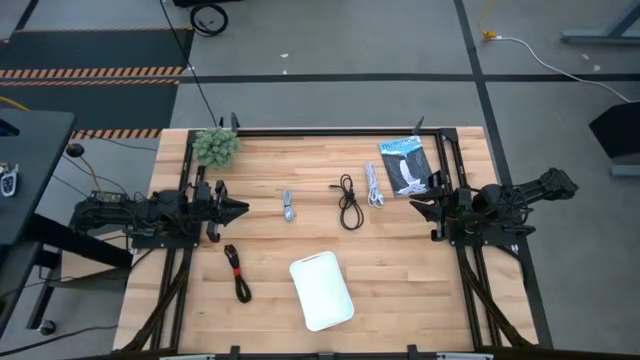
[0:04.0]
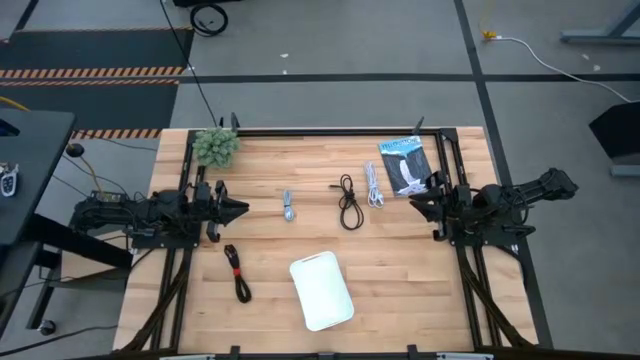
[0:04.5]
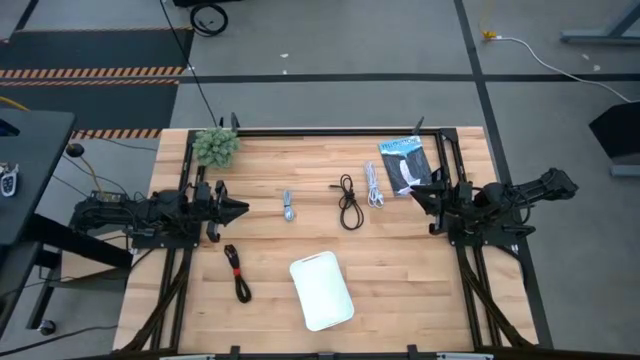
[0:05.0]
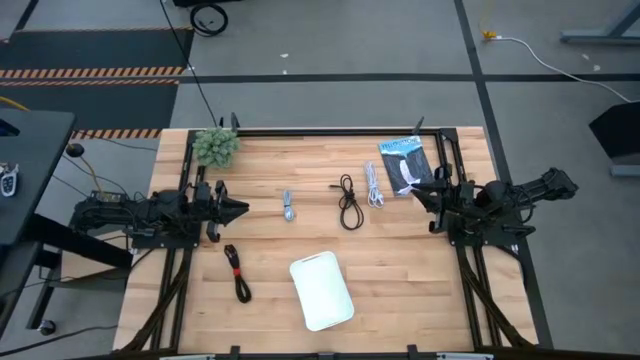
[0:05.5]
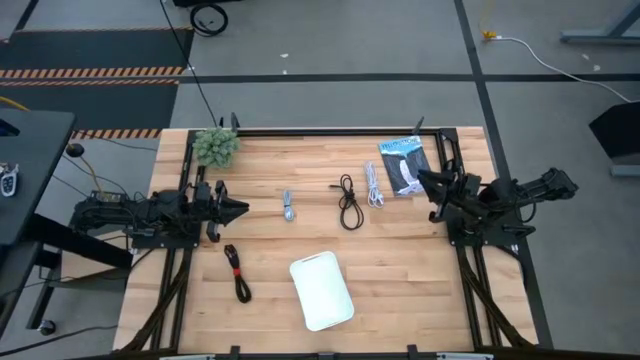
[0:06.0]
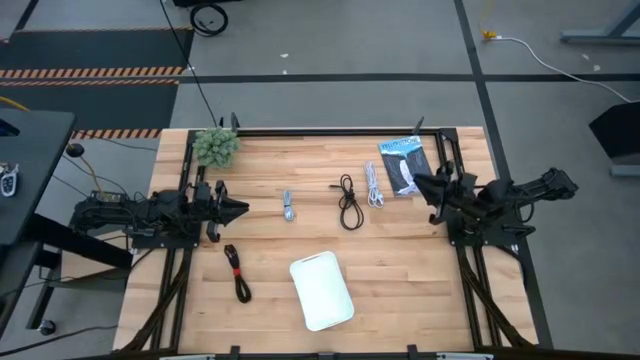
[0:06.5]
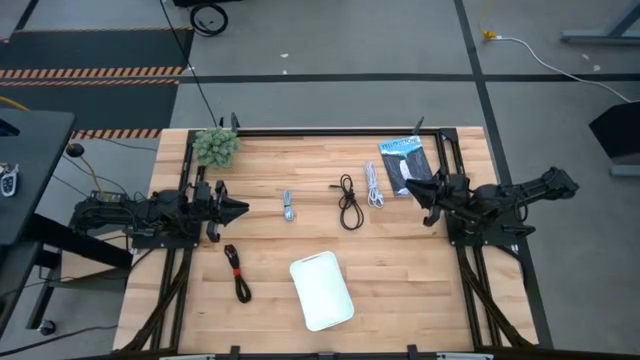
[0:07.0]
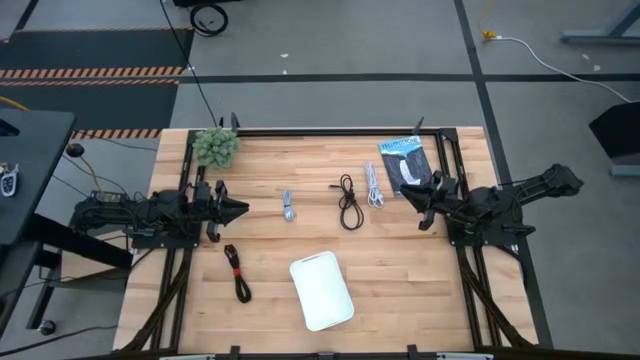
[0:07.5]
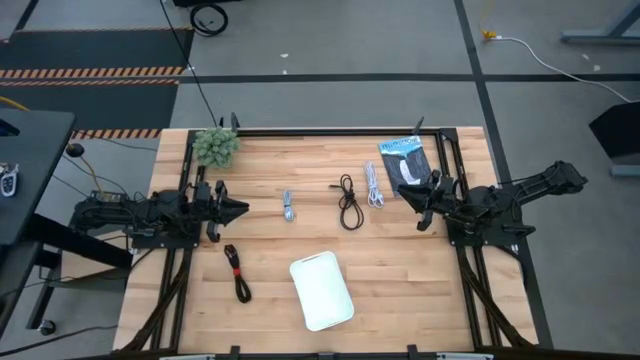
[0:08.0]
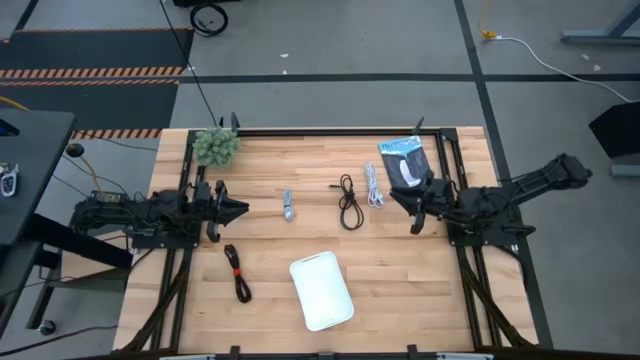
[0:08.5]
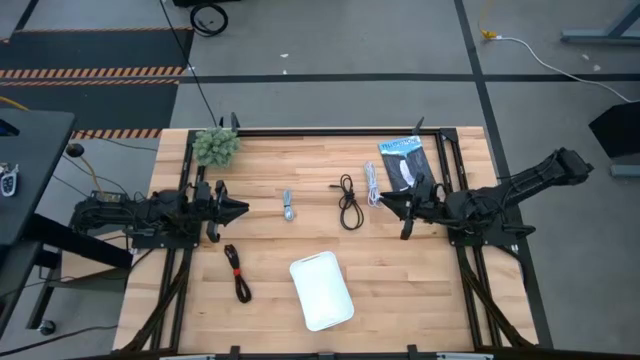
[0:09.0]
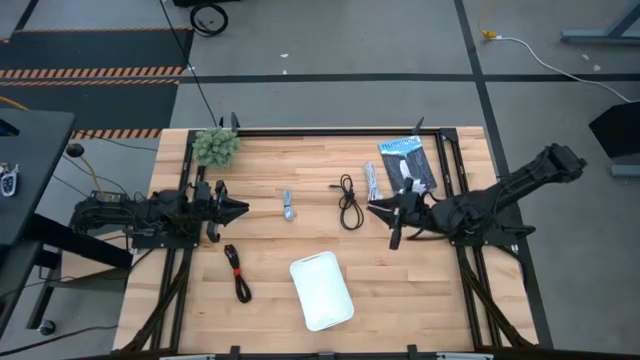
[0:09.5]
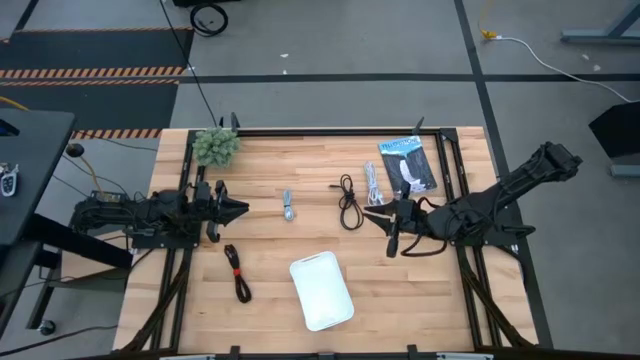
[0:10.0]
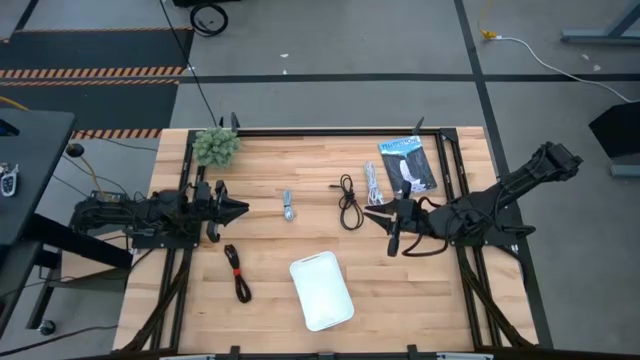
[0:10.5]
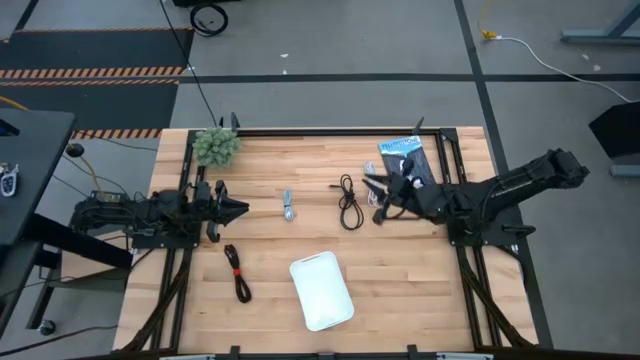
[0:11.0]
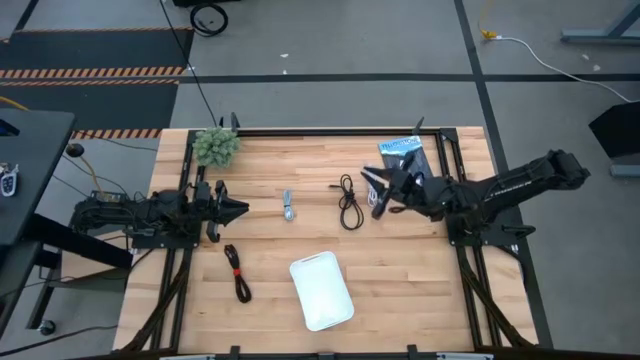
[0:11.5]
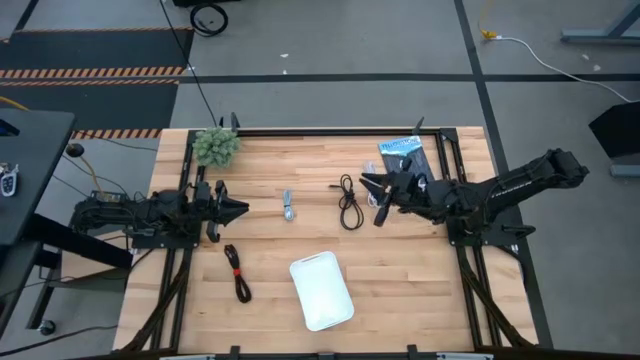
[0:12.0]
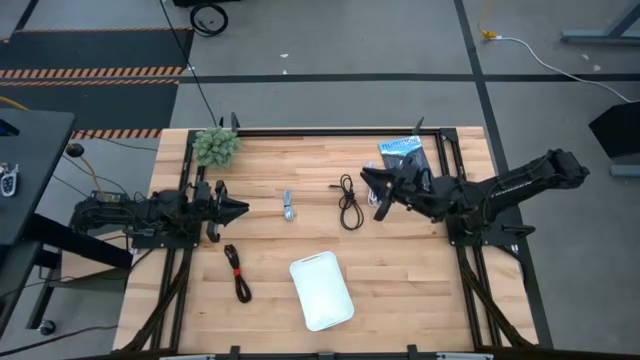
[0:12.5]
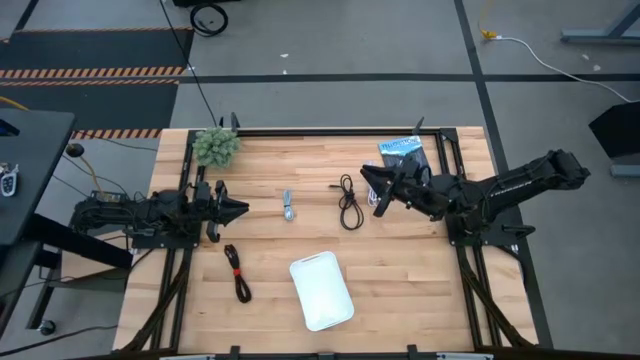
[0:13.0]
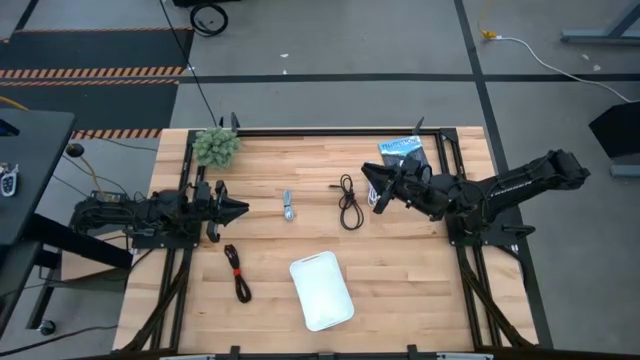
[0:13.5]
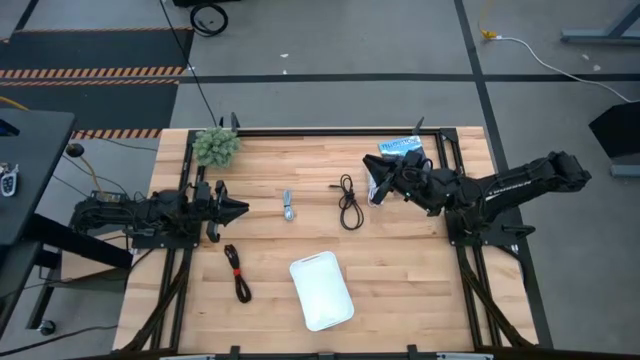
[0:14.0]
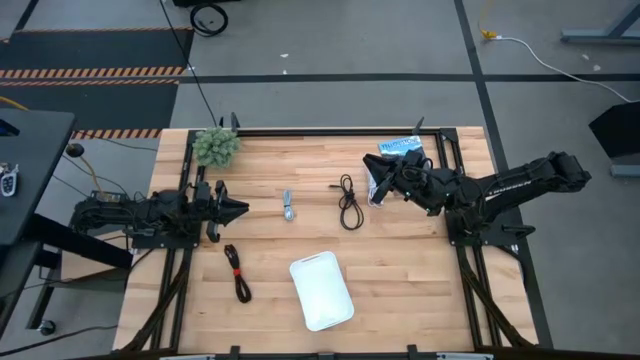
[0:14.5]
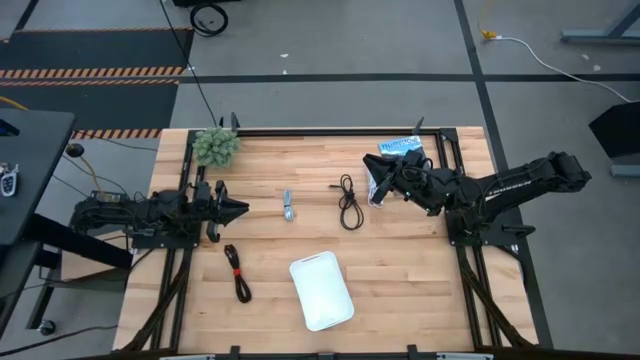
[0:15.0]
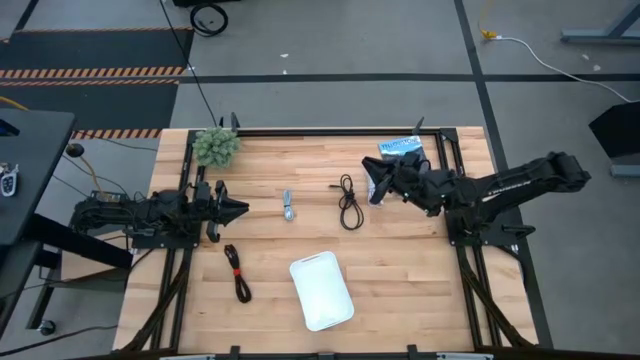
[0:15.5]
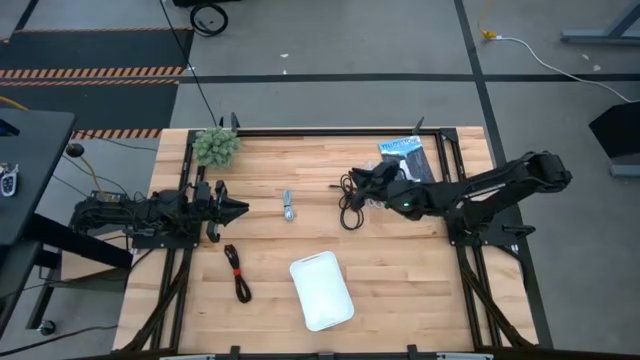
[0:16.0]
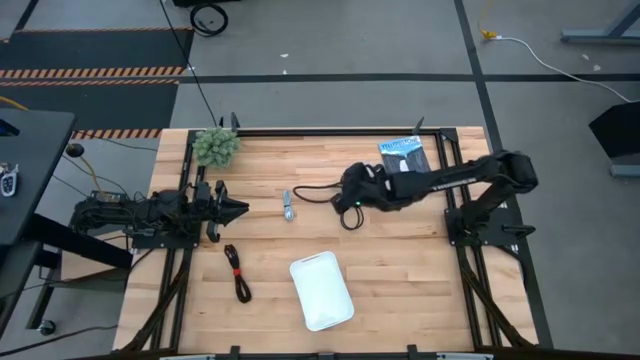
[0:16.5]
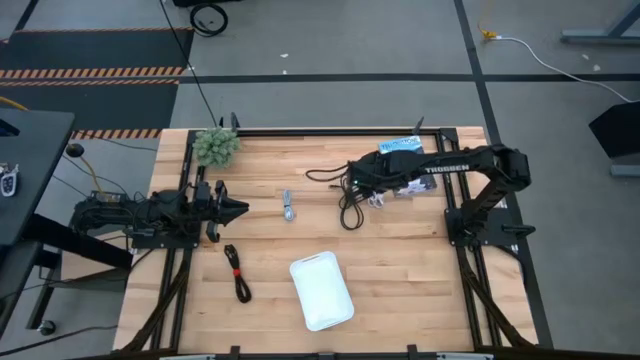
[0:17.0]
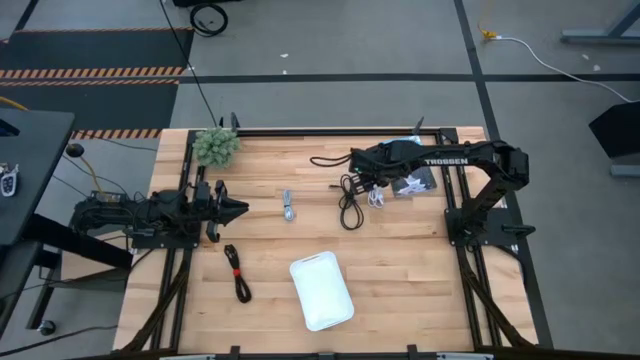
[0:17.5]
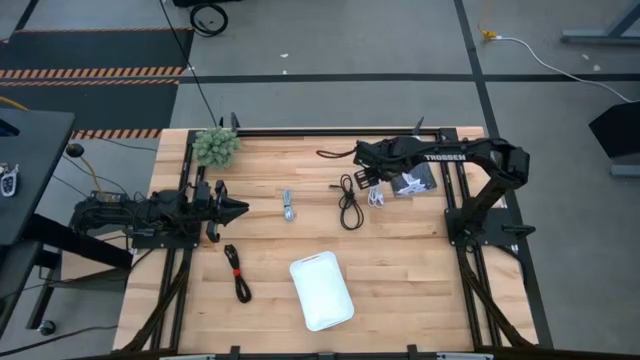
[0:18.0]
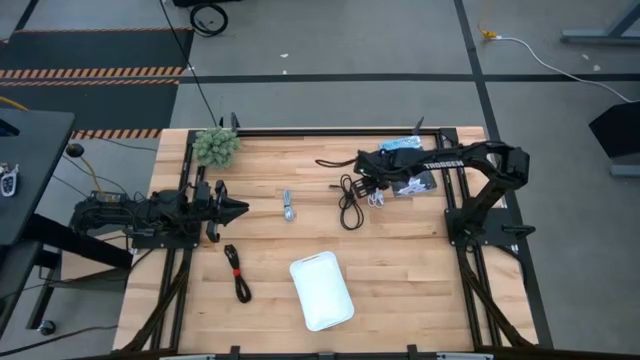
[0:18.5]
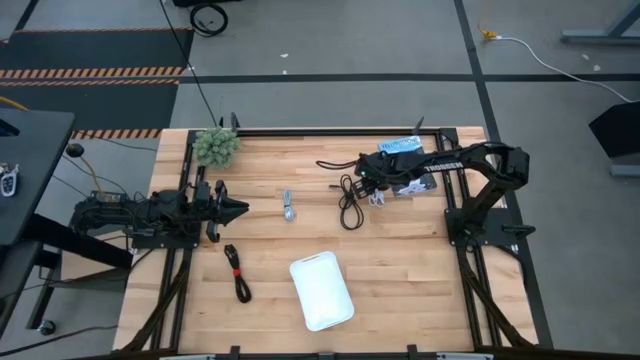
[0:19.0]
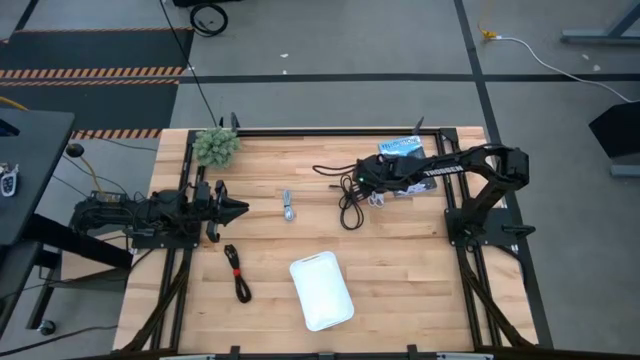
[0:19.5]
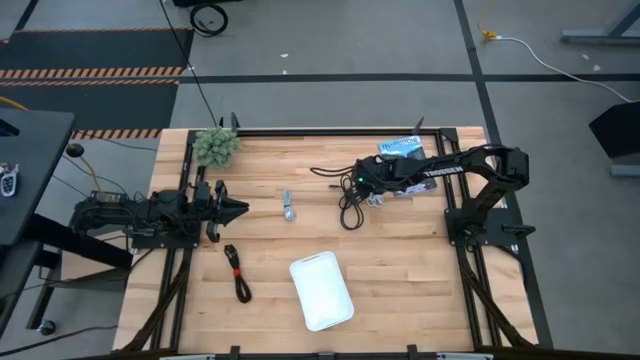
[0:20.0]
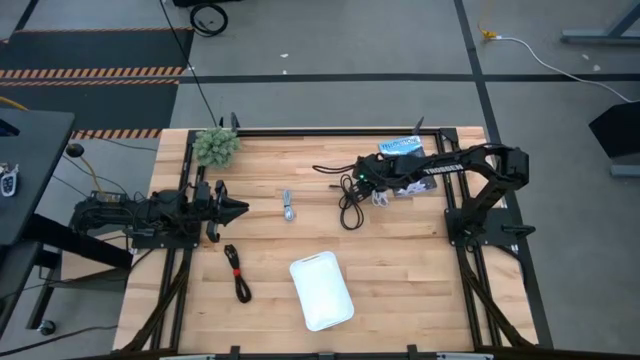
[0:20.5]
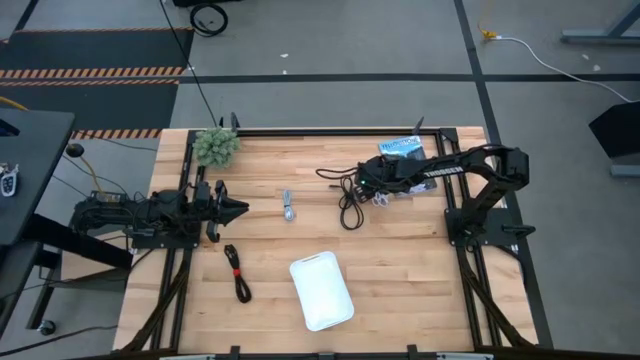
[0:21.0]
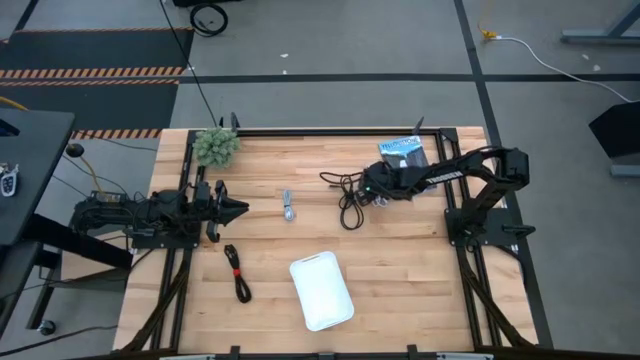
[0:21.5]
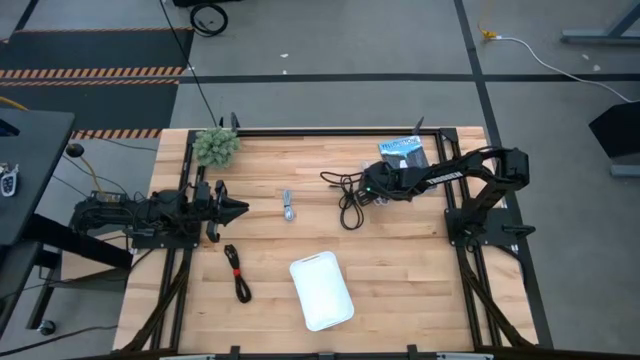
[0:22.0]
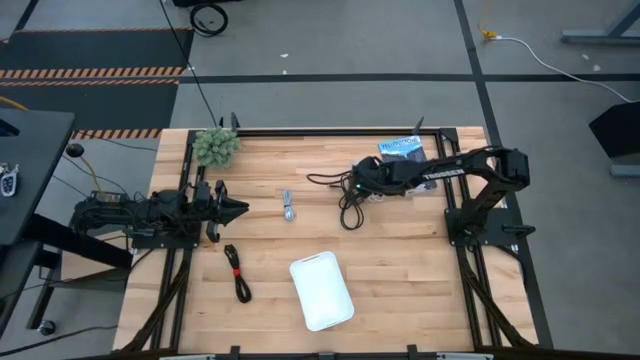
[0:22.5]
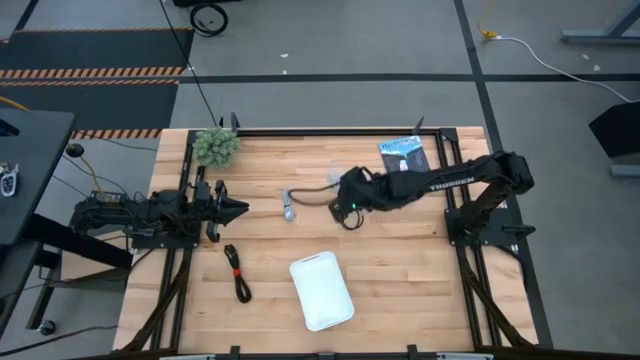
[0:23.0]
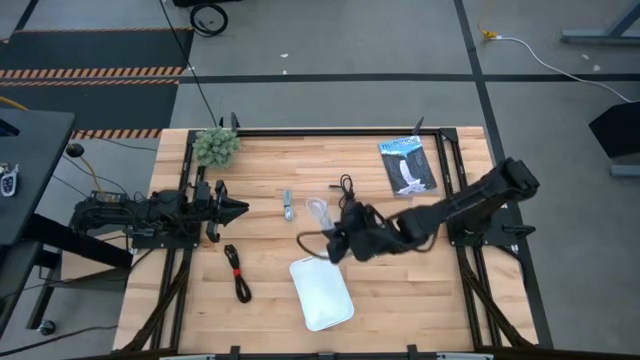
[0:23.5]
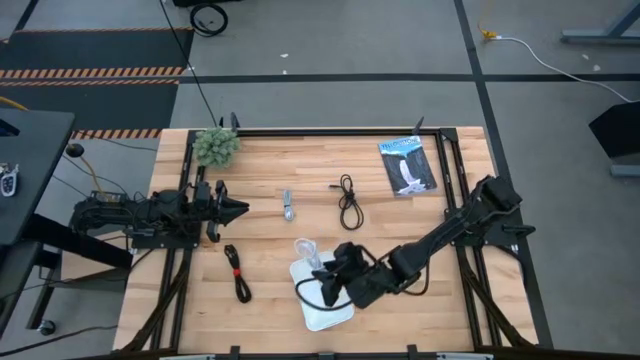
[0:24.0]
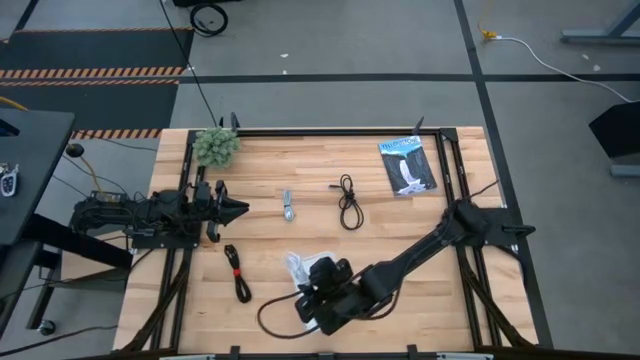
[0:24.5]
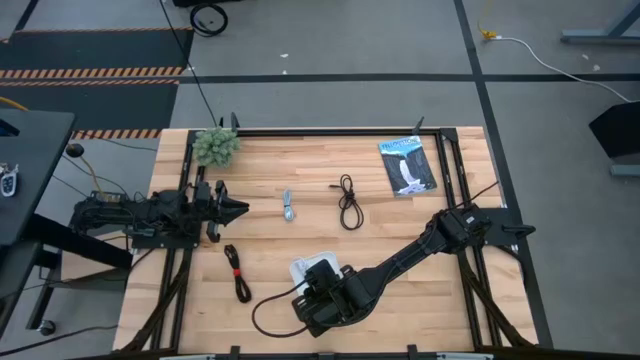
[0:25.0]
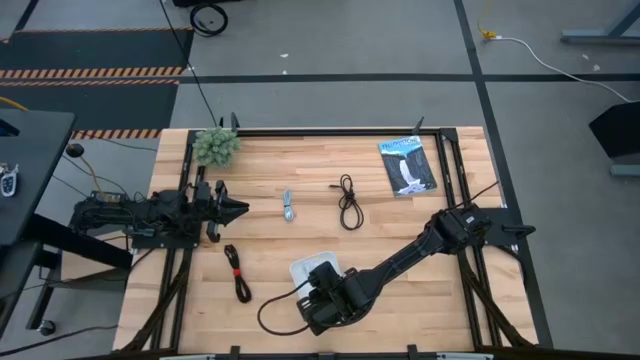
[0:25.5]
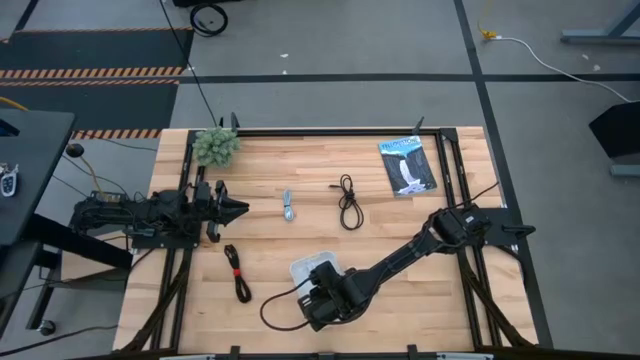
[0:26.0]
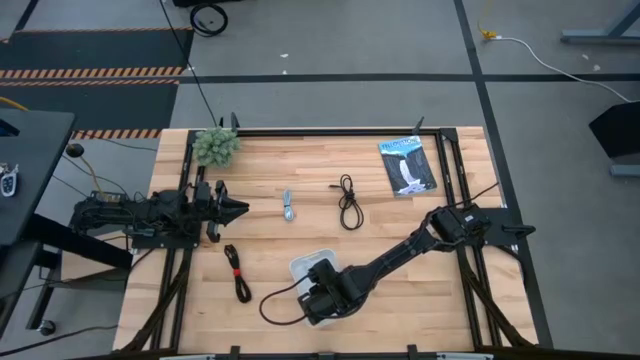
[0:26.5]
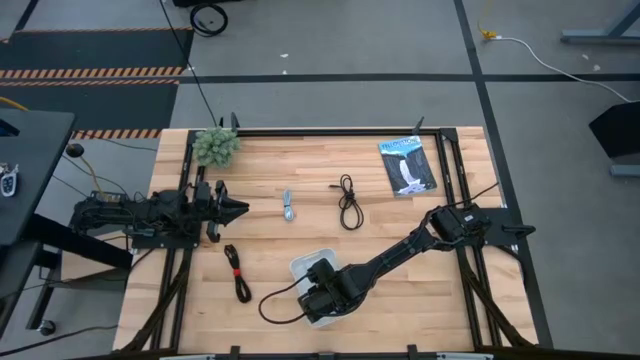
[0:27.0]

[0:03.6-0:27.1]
Task: Pick and place USB-C Cables
Put the white charger cable into the white bin
